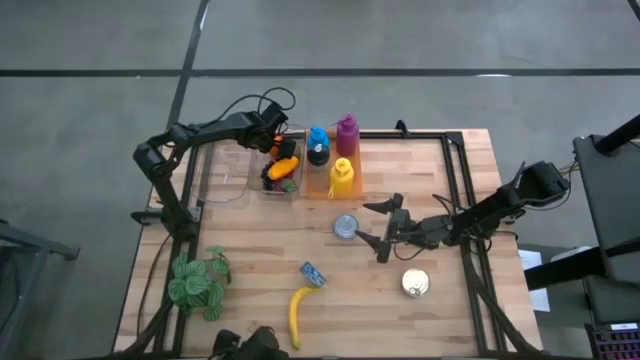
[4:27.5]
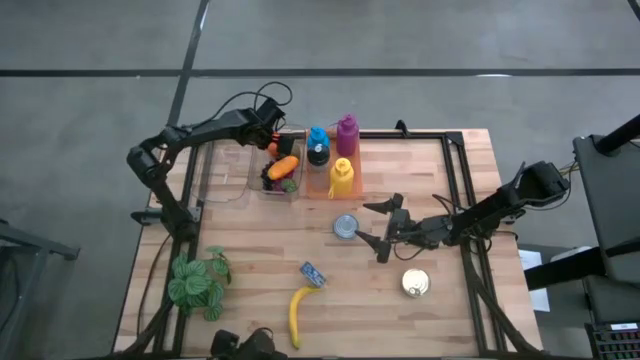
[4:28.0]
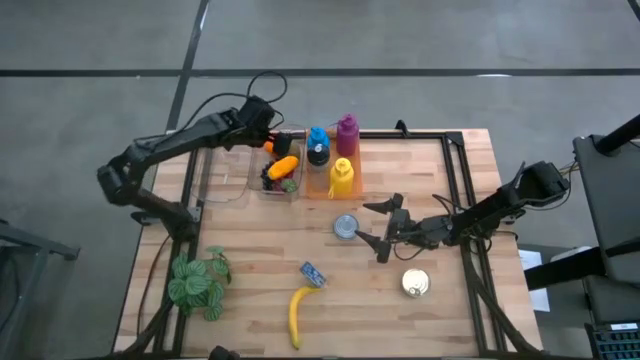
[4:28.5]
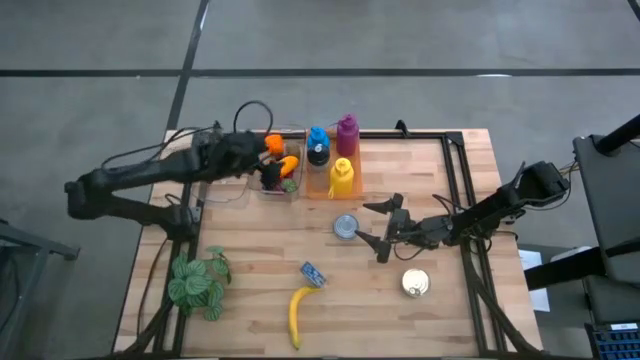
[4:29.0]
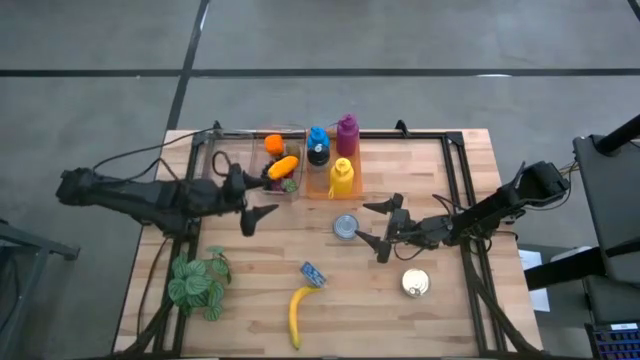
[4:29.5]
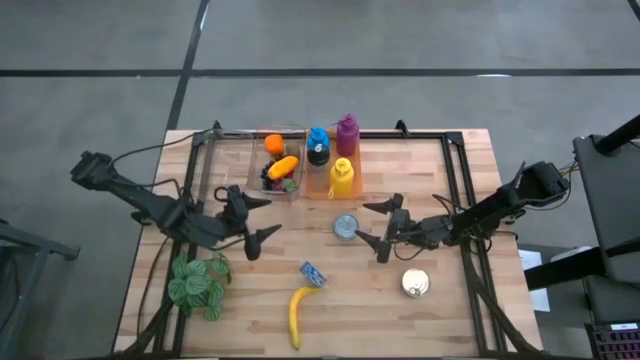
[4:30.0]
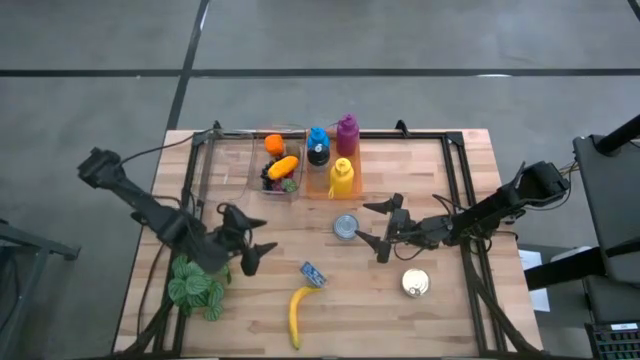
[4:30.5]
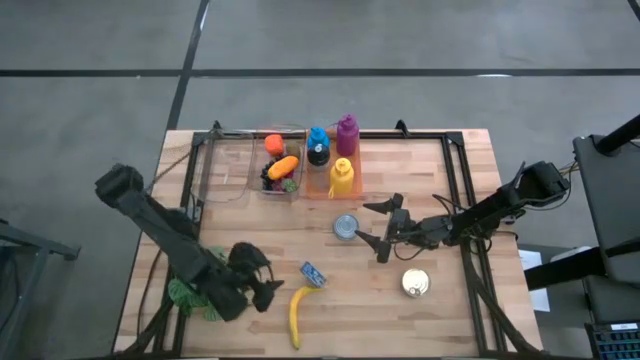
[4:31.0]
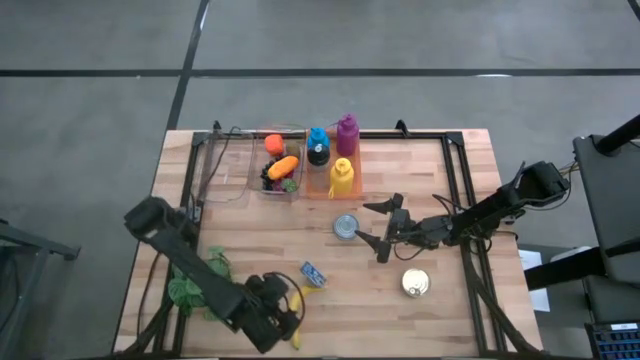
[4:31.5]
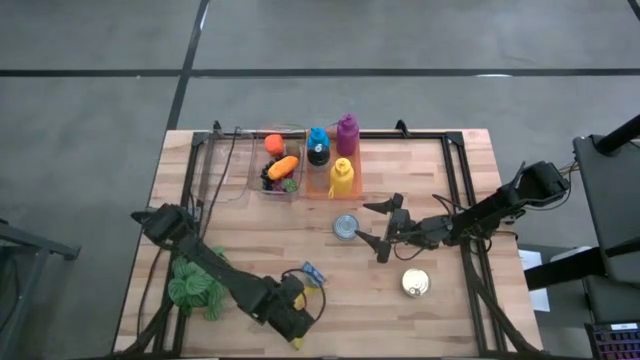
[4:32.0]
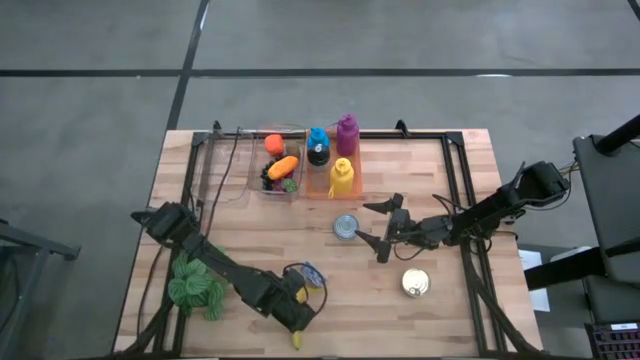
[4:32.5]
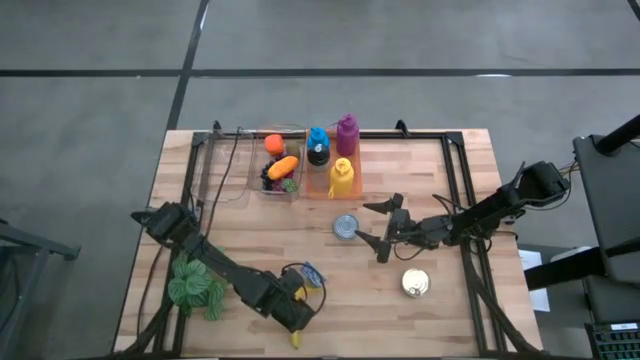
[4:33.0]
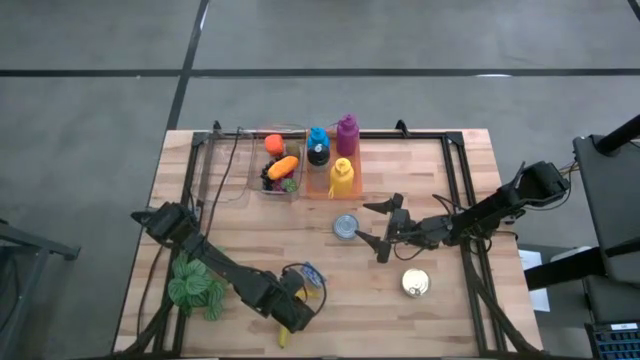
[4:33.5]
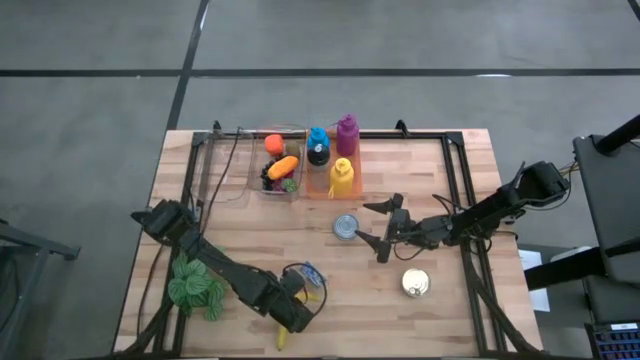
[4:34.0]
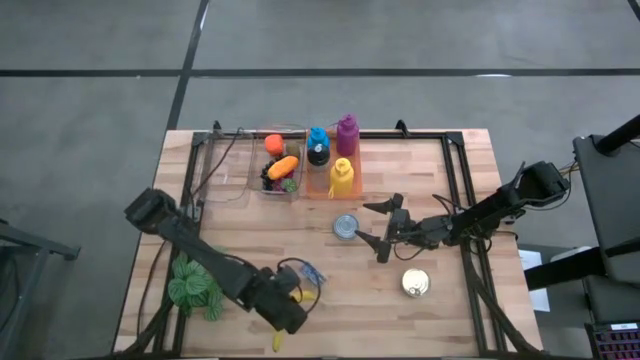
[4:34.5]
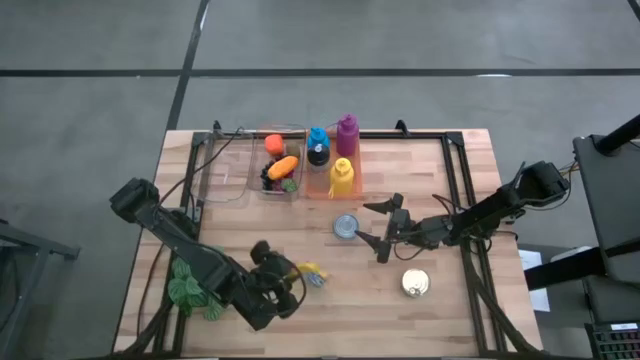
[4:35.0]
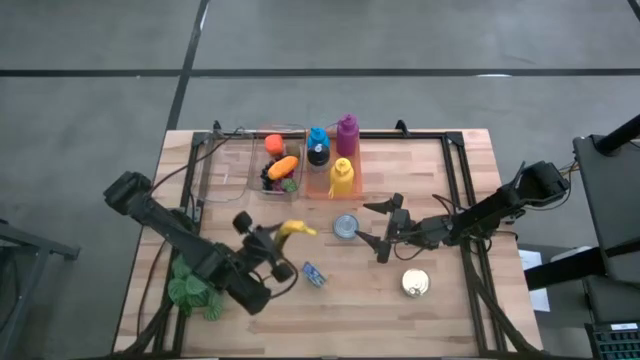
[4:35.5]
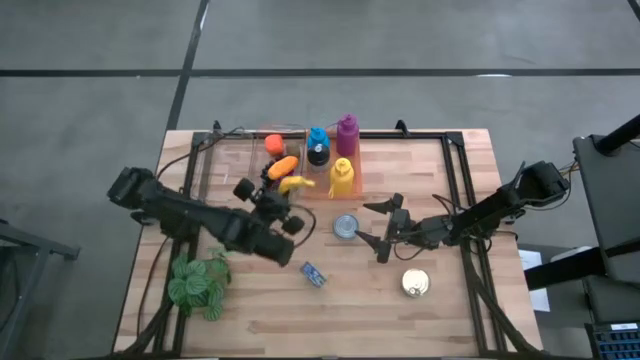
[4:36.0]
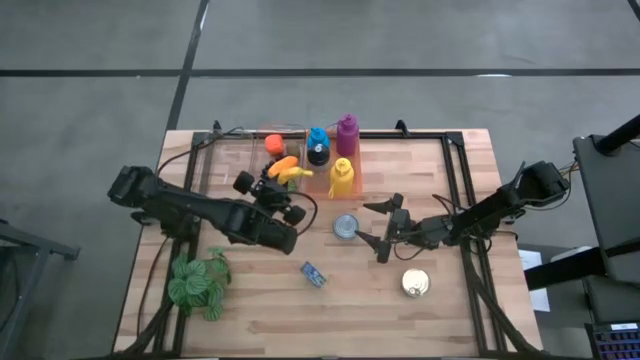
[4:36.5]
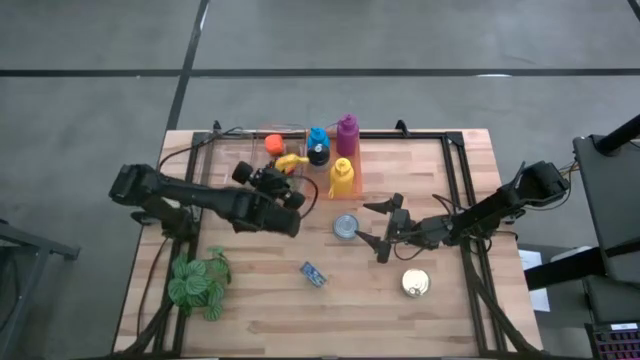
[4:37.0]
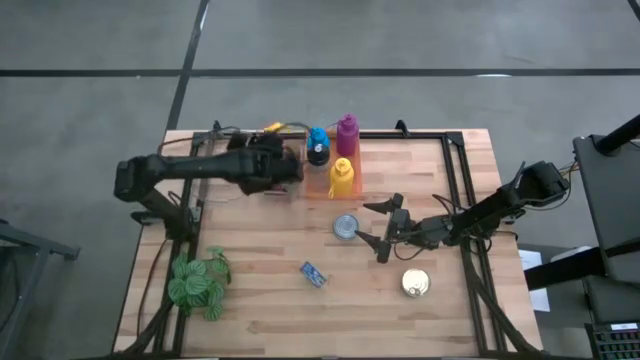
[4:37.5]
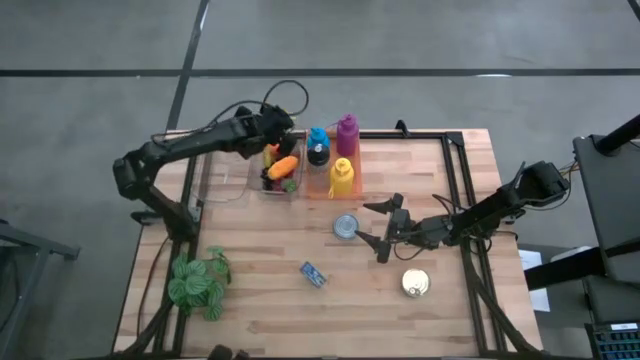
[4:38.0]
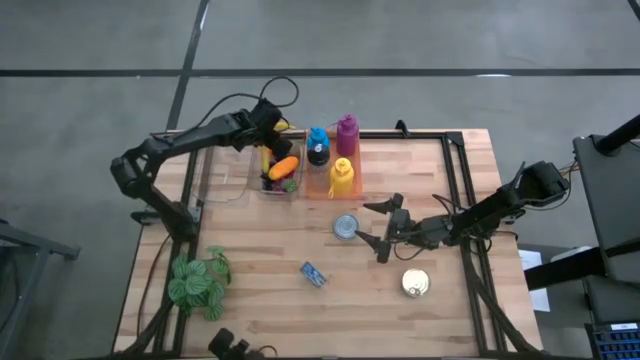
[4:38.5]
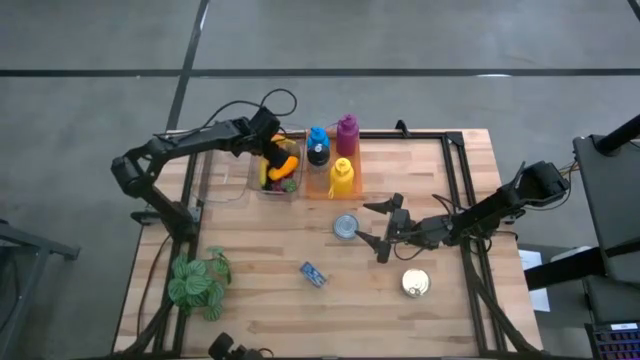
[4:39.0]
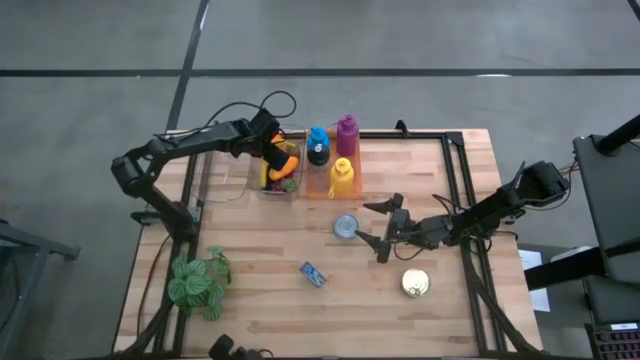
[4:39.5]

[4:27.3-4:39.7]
Task: Pick & Place Food Item
Put the yellow banana into the right transparent bin
